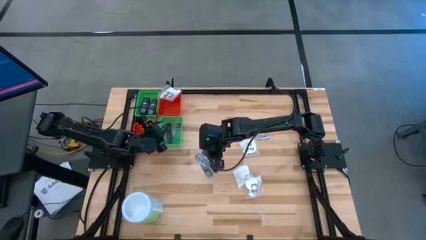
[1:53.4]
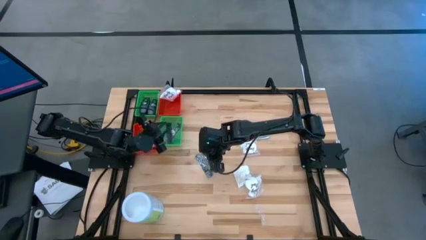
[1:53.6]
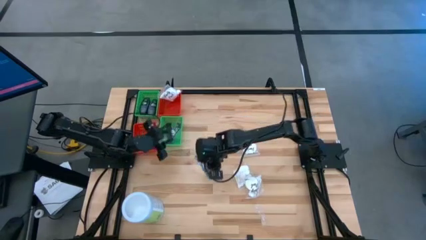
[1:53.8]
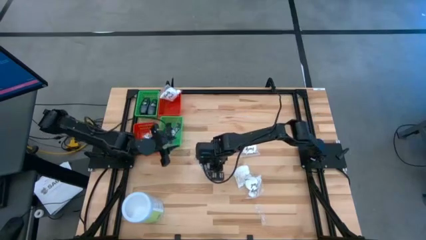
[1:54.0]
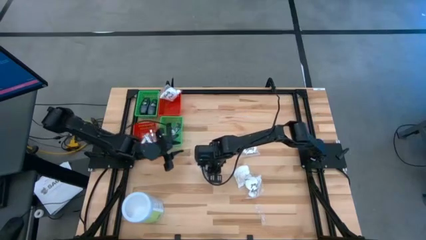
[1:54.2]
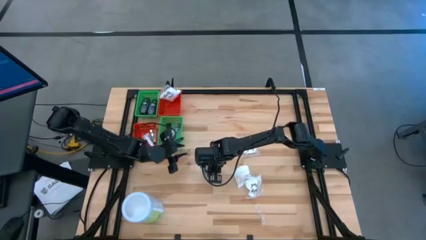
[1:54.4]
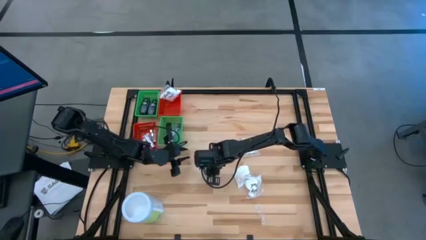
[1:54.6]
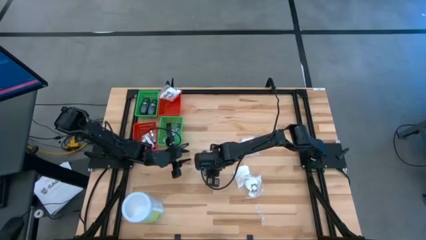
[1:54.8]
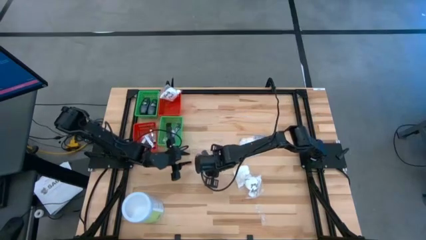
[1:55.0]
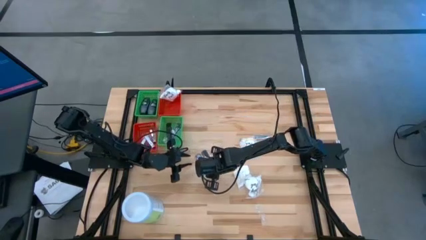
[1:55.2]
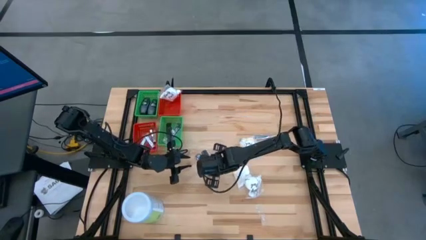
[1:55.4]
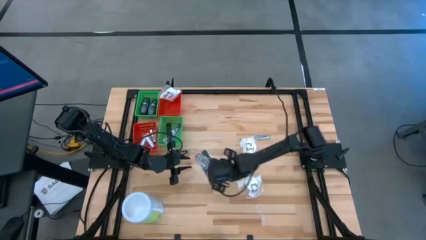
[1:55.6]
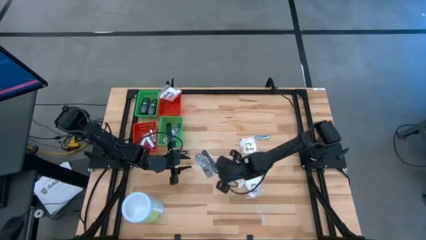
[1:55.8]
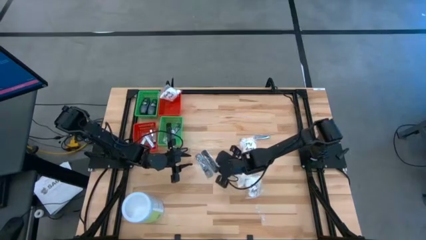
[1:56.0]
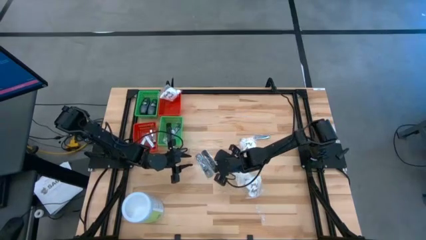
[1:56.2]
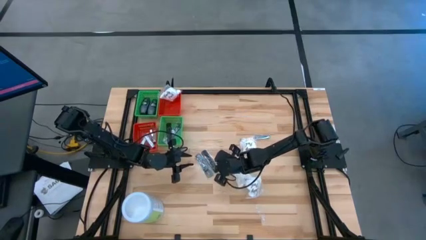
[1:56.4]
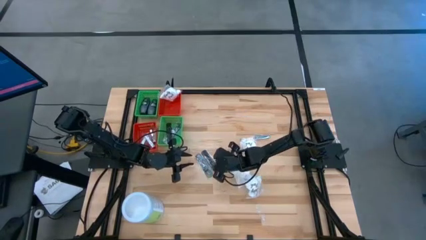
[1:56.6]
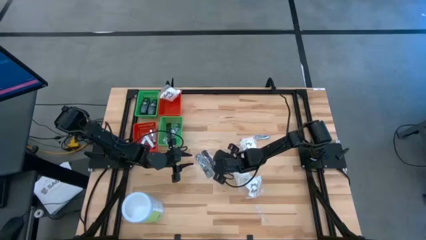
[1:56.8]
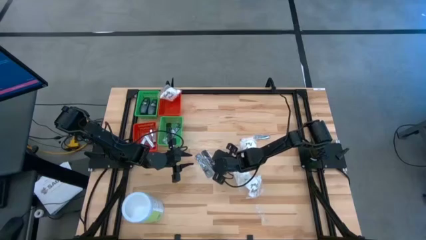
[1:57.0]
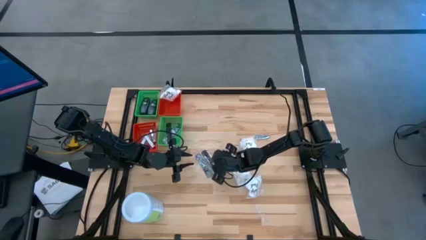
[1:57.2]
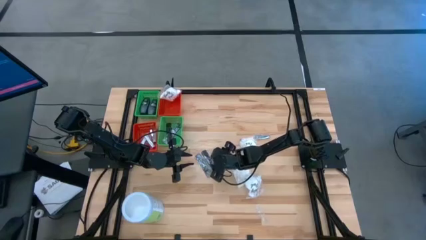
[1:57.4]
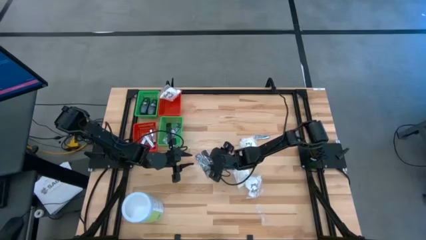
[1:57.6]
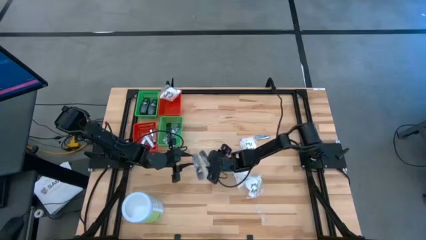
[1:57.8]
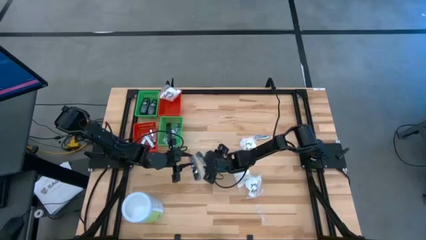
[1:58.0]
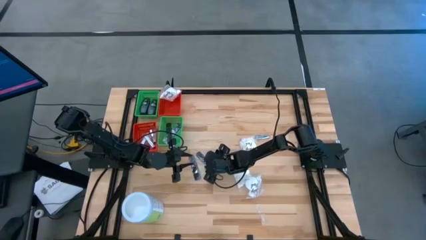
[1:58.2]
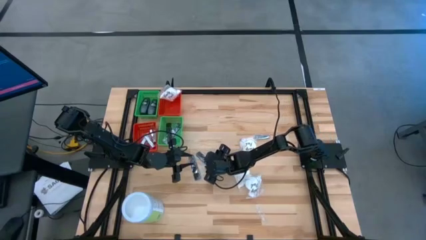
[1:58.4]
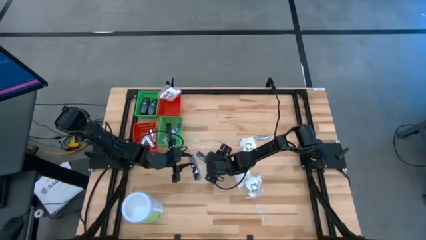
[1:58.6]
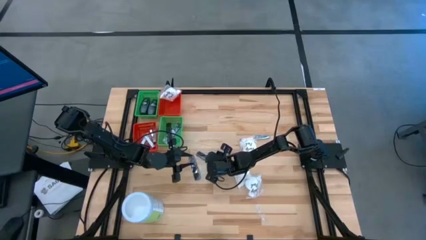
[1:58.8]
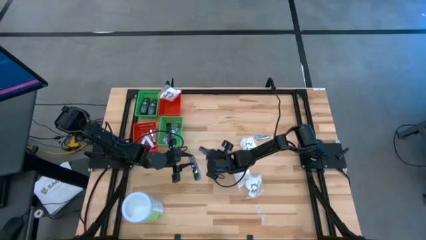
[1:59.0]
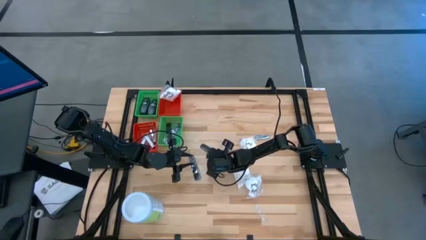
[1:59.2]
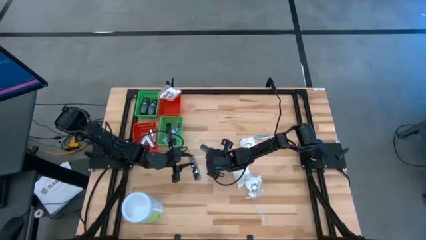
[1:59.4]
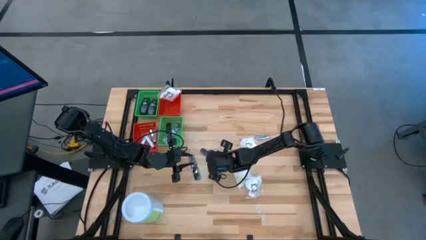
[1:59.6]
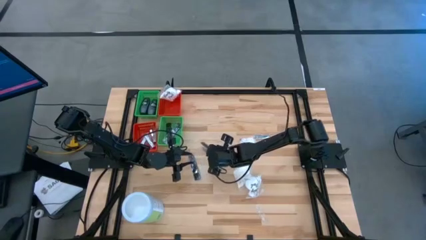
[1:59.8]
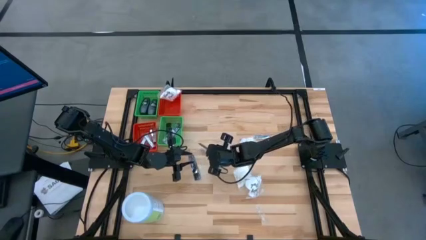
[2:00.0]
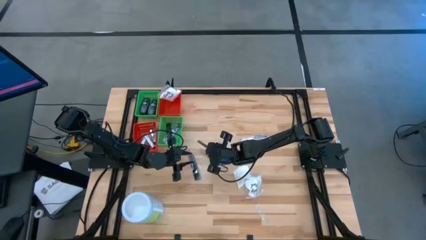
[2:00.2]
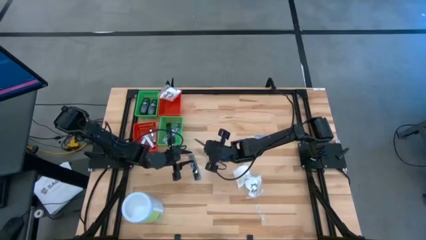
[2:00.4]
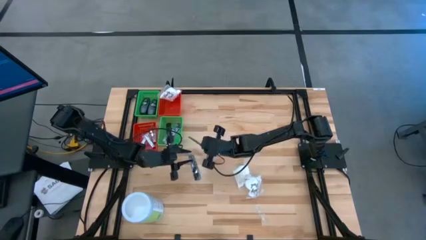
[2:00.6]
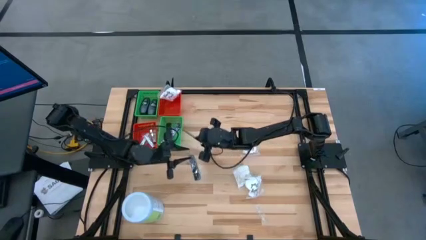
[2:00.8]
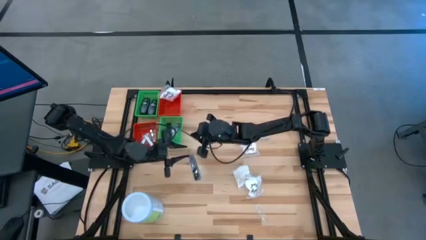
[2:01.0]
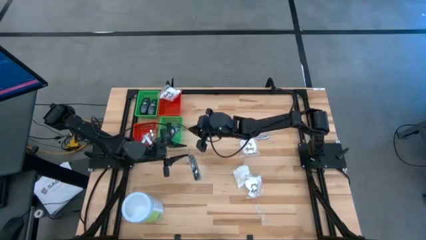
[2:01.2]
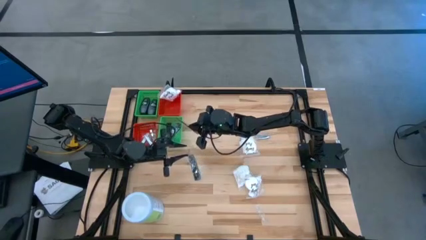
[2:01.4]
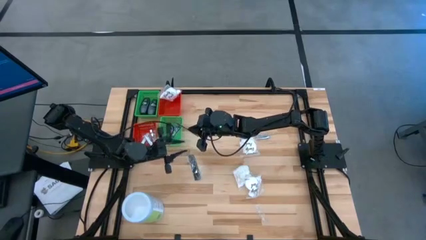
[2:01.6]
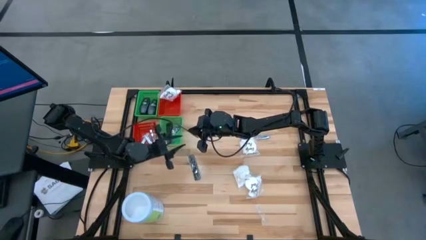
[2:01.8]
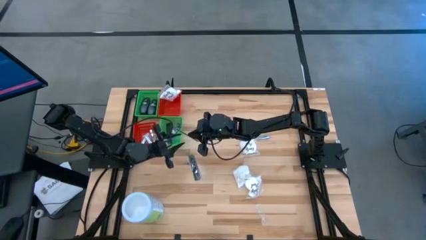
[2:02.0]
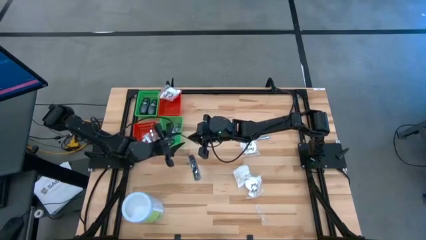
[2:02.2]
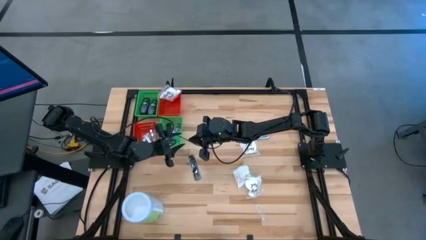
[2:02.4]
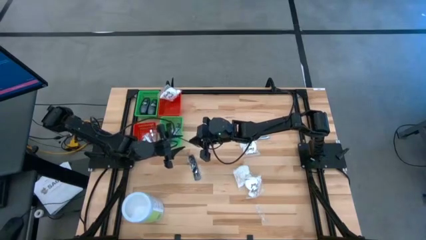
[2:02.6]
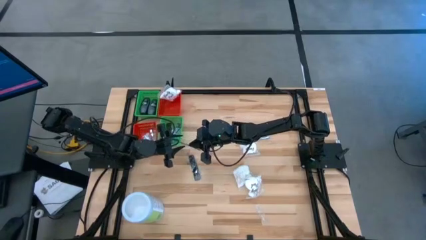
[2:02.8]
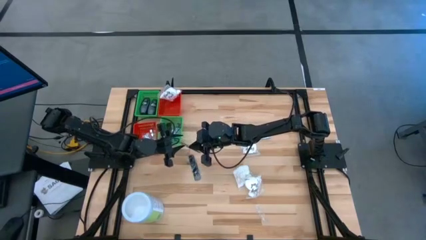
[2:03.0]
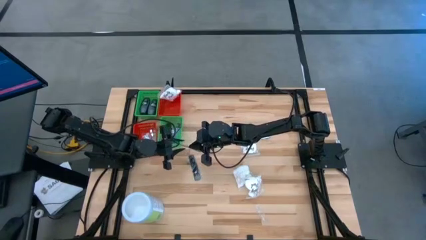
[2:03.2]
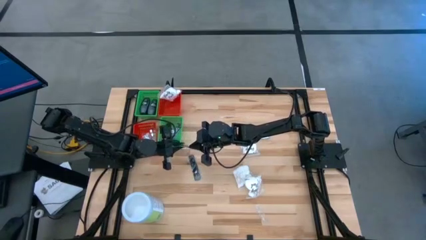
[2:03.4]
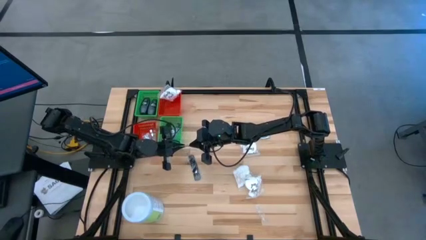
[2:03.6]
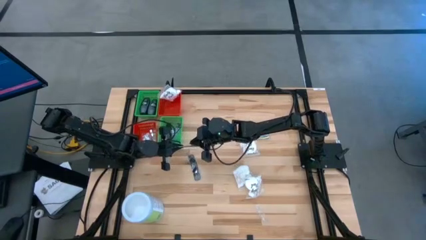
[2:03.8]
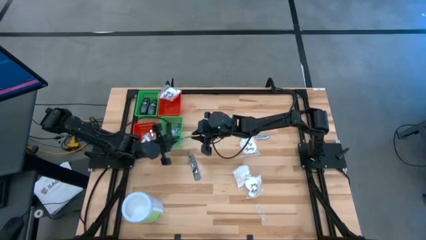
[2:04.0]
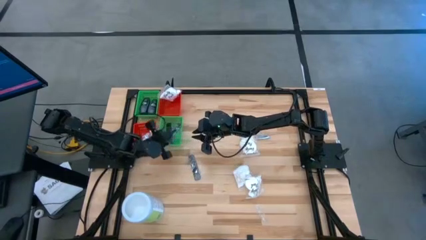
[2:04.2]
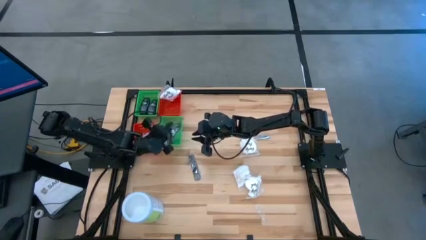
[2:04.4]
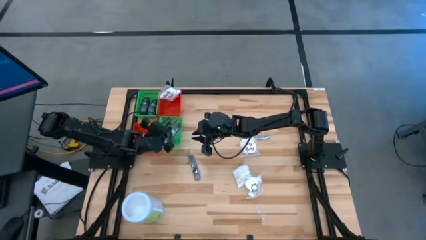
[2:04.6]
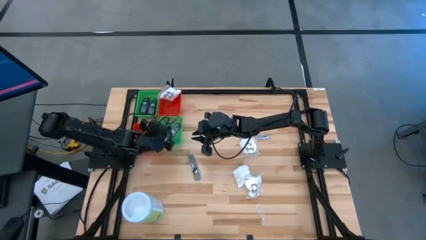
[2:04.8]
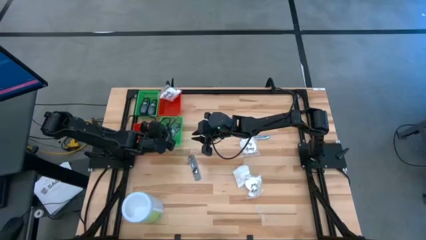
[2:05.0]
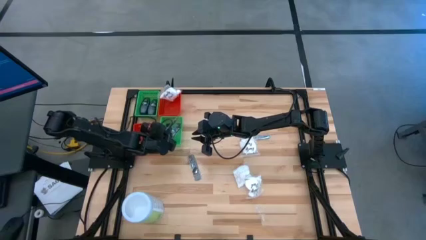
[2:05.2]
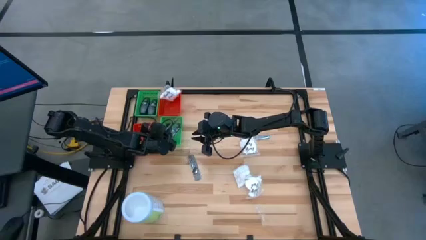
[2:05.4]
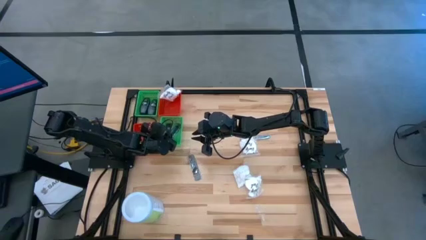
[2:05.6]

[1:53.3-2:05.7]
Task: Pick & Place Travel size toiletries
Put the black comb into the bottom green bin

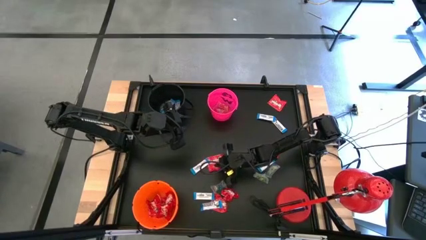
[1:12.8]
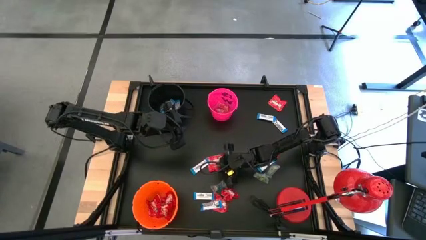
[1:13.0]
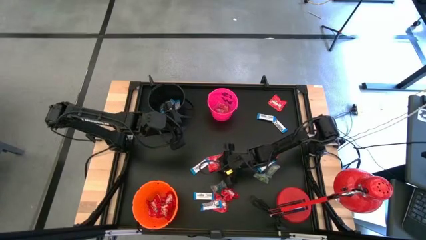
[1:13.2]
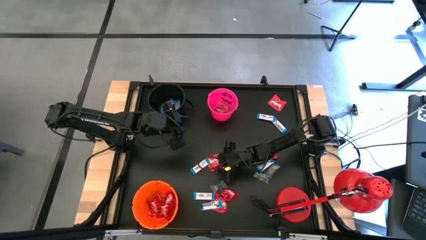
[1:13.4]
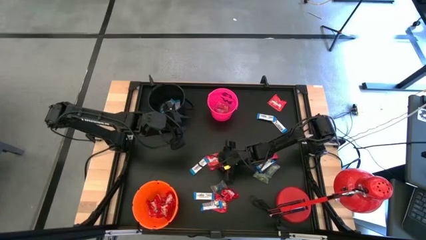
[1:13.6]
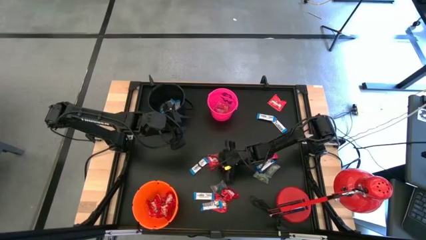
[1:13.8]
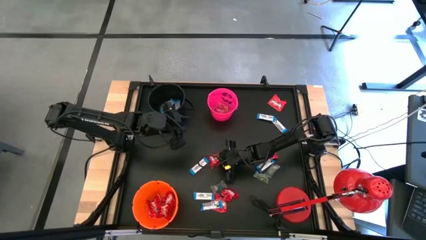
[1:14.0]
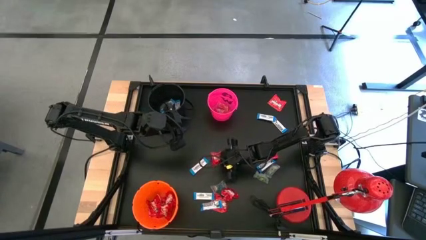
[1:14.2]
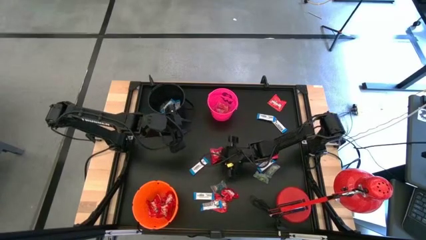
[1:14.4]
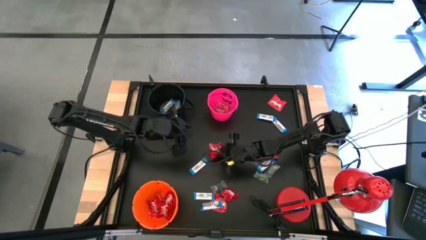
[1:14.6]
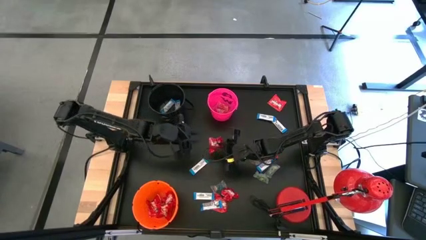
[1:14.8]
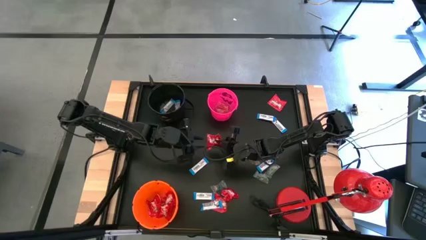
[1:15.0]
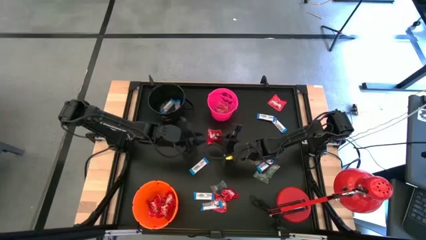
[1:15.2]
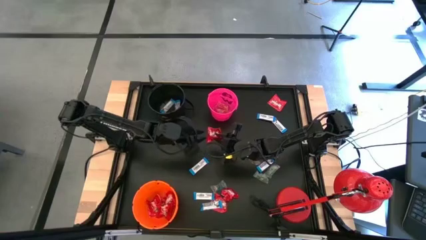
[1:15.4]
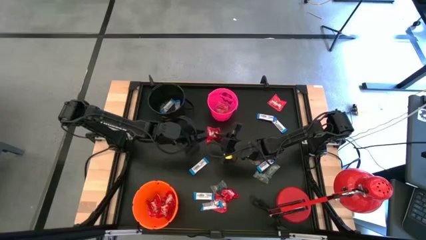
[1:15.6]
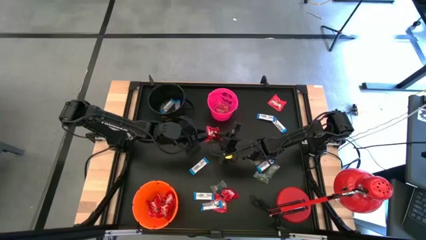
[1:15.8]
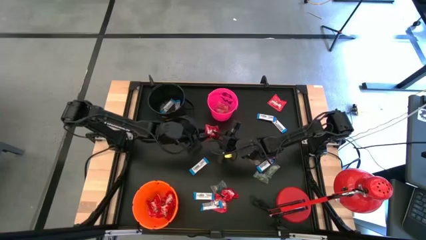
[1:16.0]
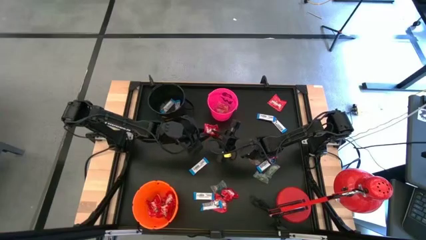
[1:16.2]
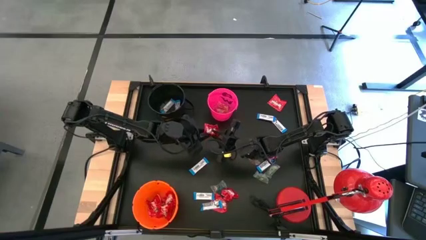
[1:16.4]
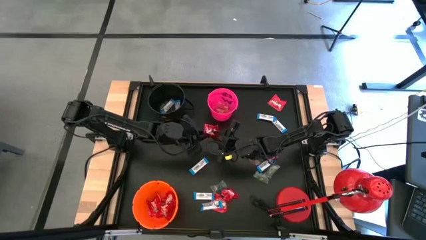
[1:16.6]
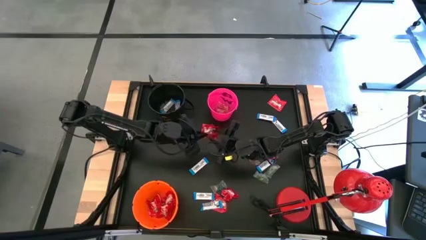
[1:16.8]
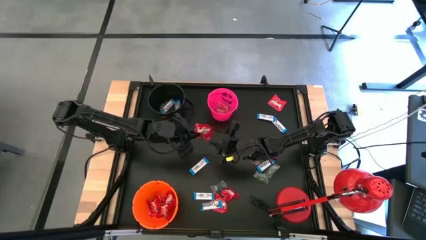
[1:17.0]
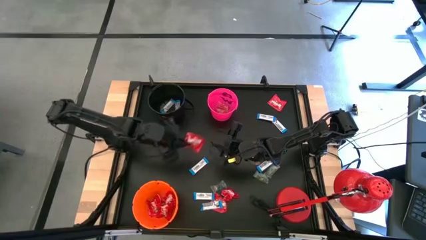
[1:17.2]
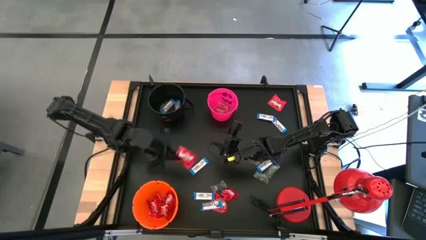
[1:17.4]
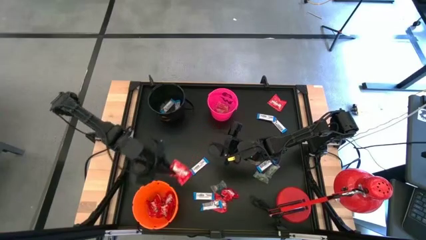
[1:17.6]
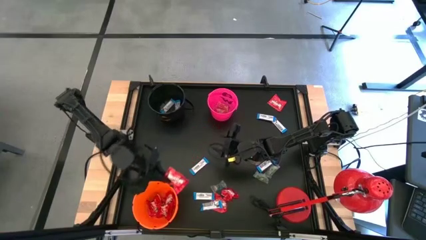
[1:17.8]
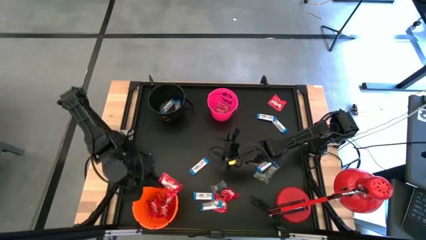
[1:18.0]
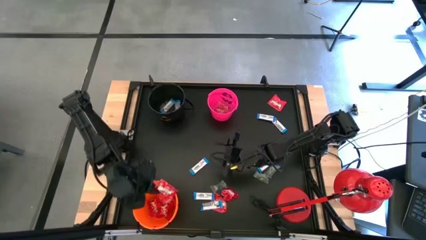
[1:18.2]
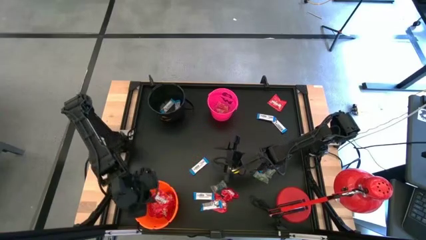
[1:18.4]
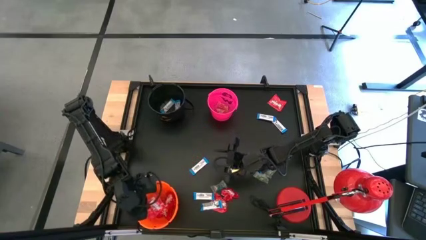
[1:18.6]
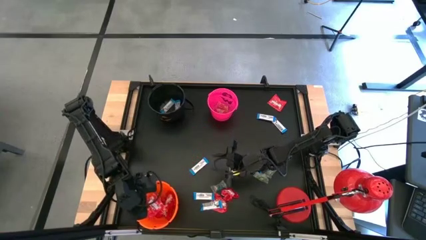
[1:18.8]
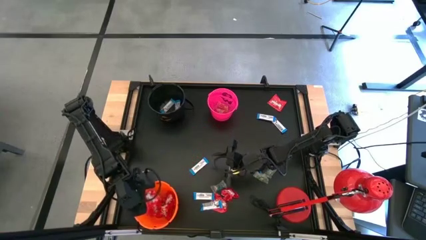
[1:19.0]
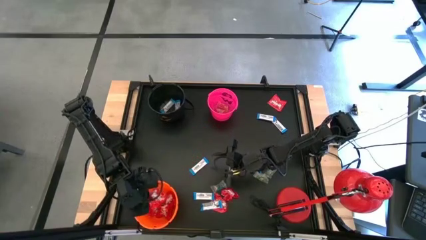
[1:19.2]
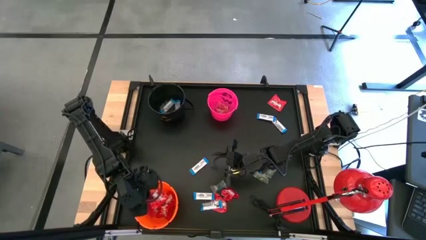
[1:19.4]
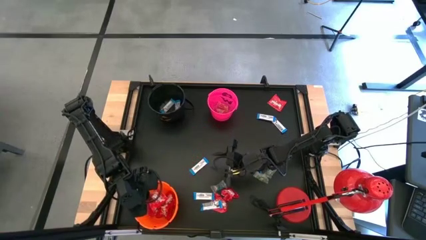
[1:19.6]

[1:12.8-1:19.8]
Task: Organize candy in baskets
Put the red candy into the orange bucket
